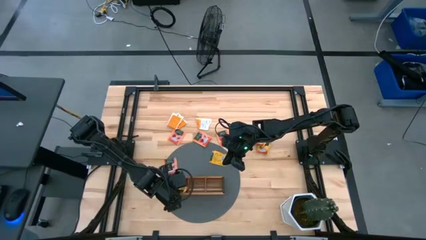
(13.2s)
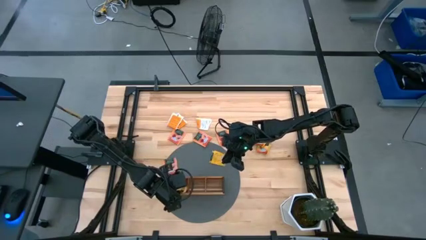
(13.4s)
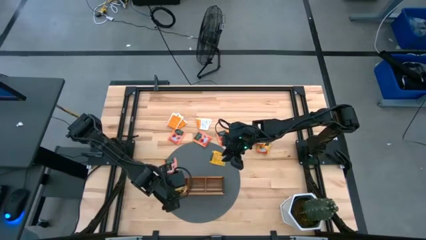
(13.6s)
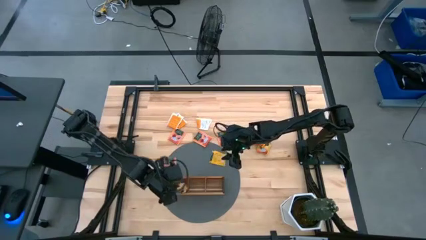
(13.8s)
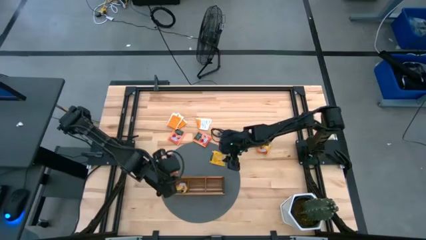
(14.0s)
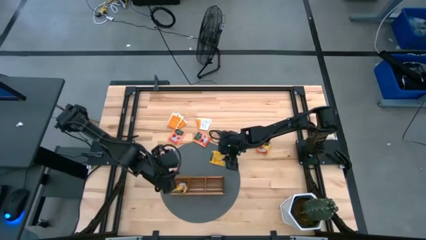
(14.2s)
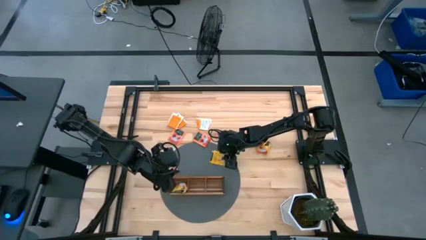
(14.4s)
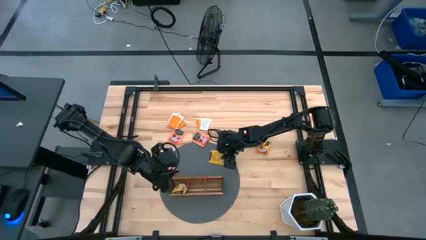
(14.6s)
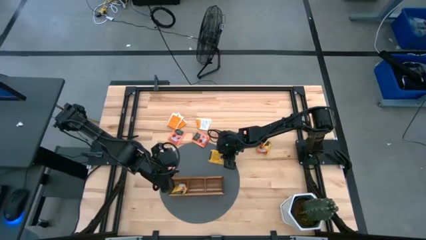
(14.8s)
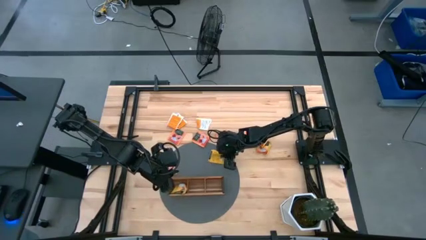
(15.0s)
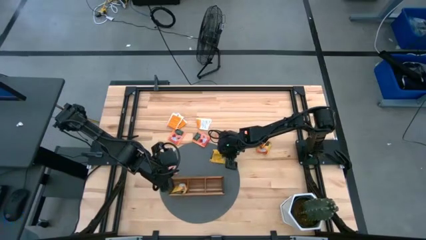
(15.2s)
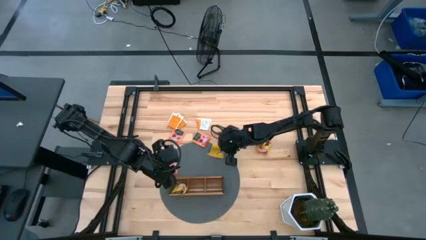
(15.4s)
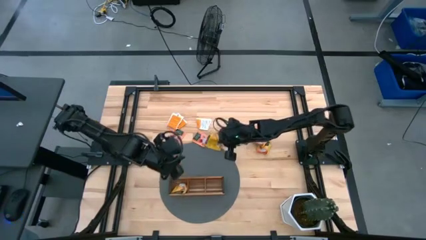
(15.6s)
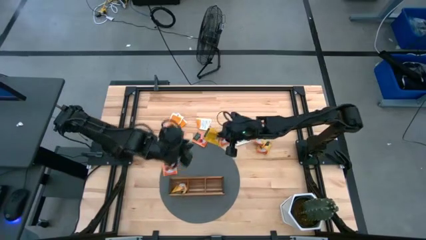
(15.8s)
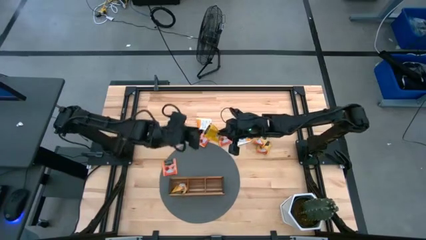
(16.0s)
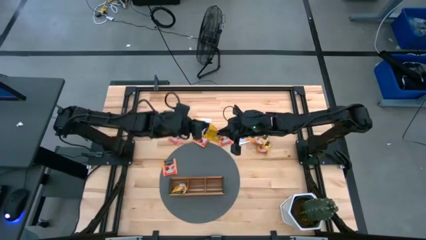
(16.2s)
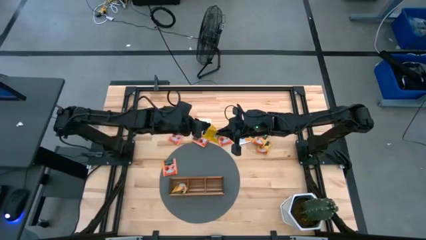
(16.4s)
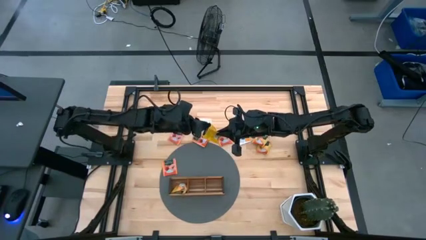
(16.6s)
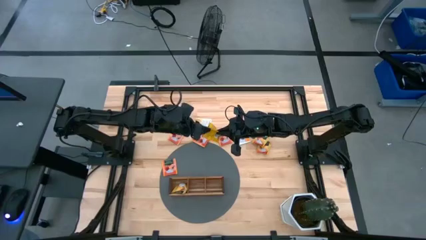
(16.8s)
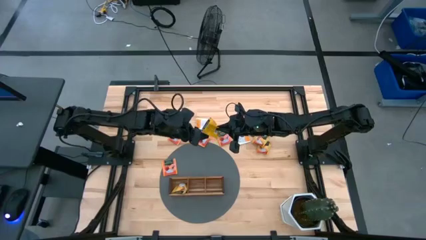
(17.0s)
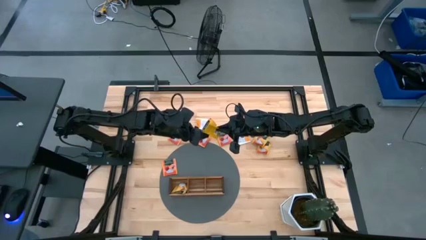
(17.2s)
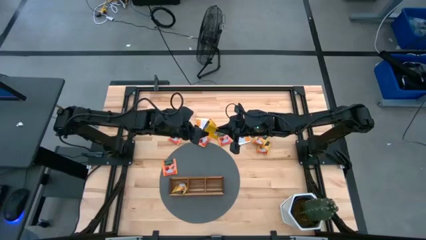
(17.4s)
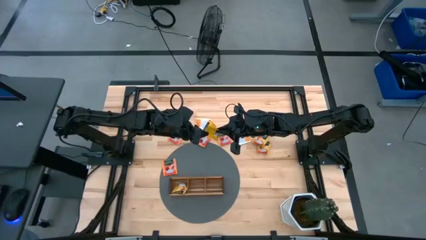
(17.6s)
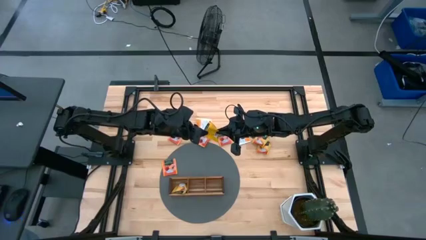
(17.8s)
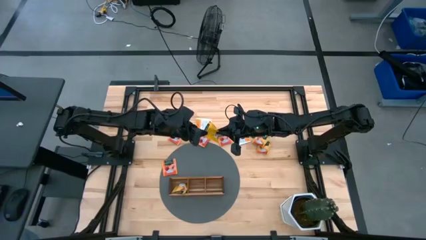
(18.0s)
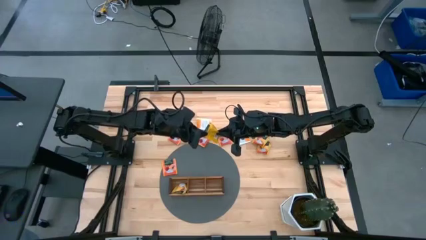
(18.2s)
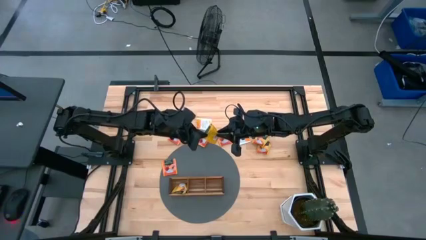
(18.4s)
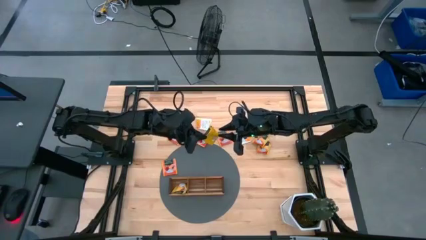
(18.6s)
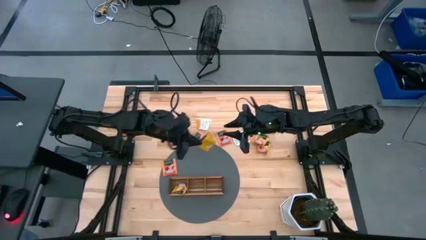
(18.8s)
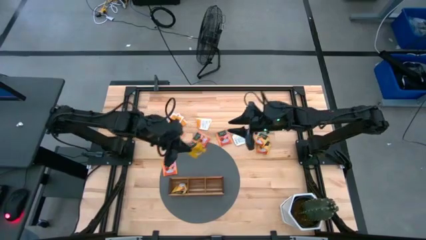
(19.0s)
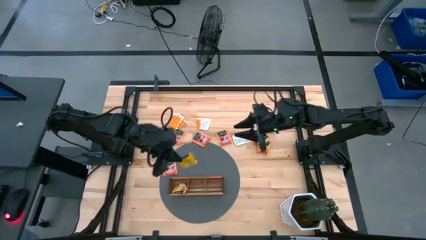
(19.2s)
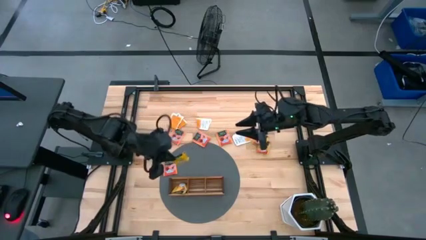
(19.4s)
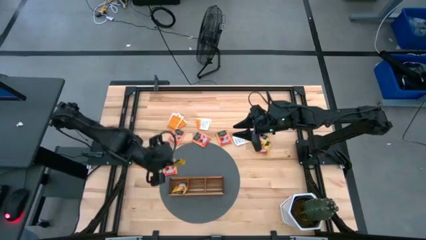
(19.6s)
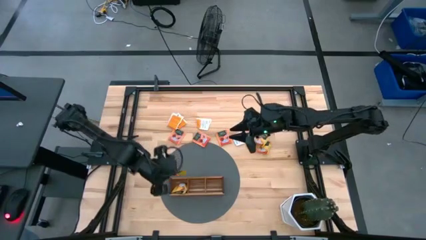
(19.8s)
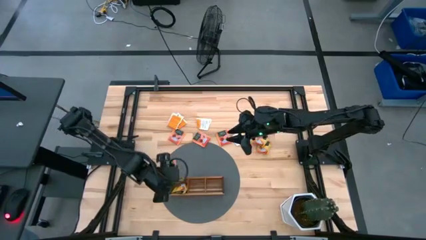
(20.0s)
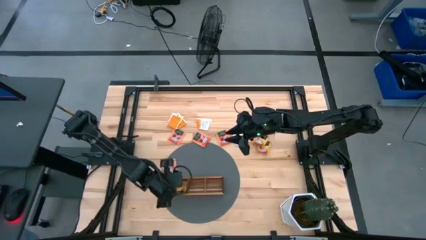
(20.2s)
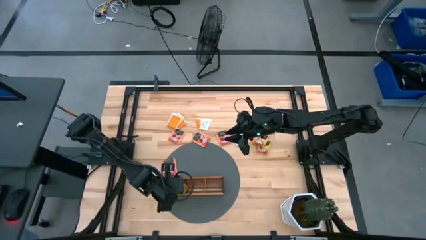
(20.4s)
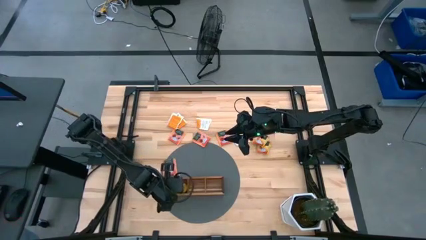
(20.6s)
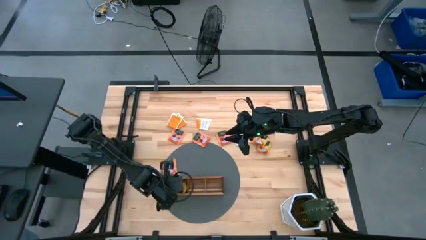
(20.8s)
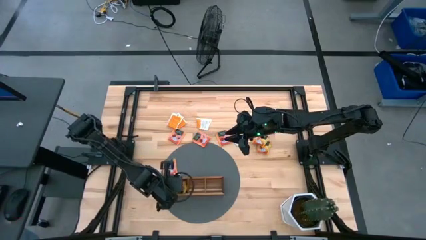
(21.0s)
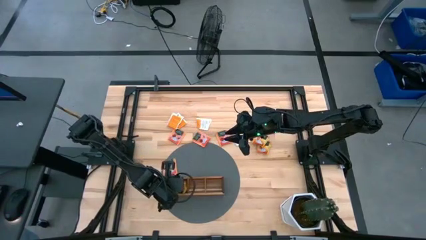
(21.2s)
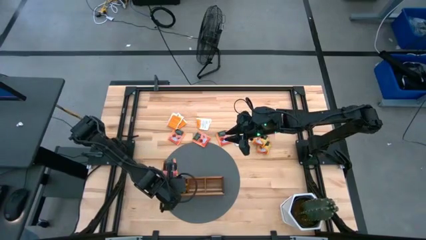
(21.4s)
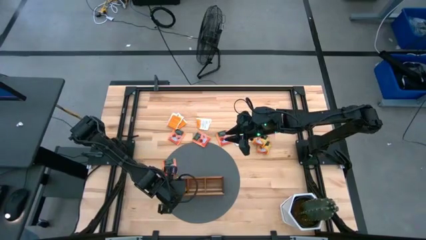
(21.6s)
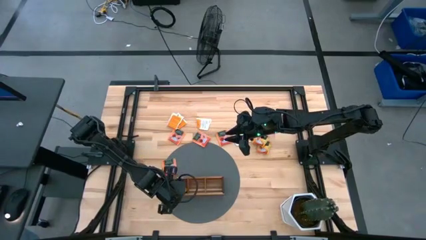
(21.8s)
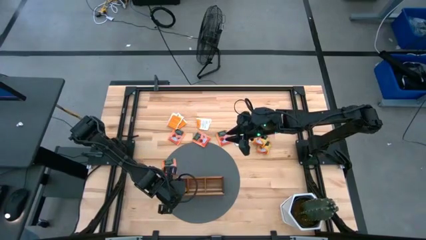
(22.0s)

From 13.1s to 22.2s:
Task: Pick & Place Tea
Put the yellow tea bag into the left section of the wooden organizer

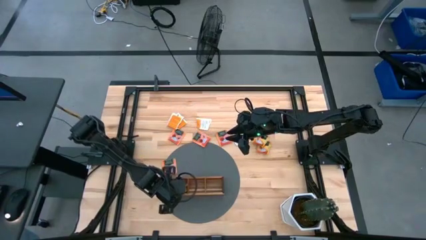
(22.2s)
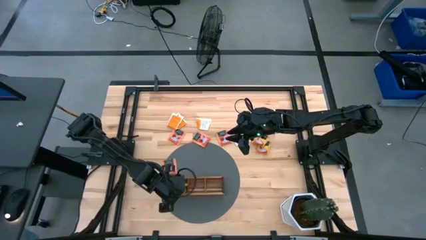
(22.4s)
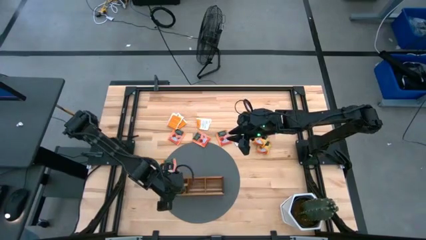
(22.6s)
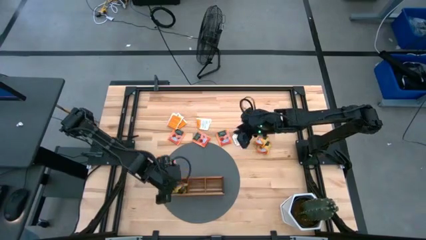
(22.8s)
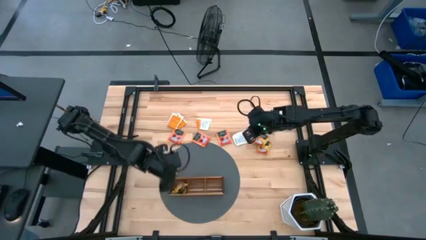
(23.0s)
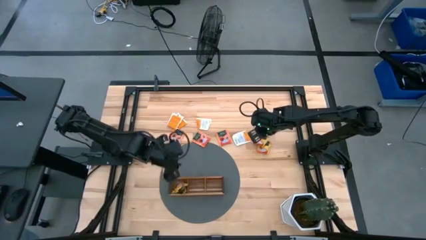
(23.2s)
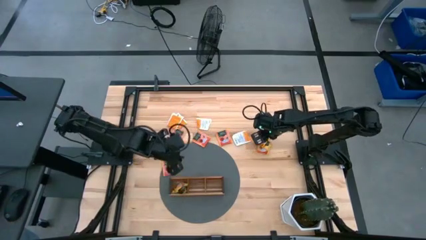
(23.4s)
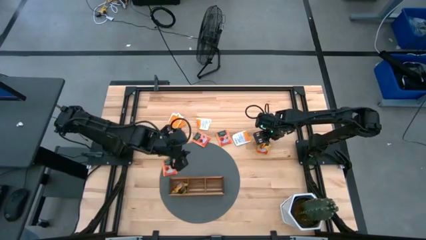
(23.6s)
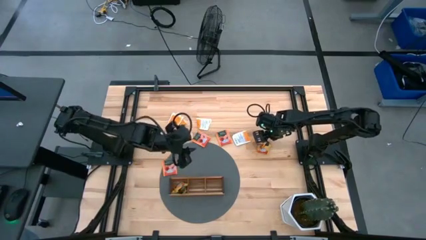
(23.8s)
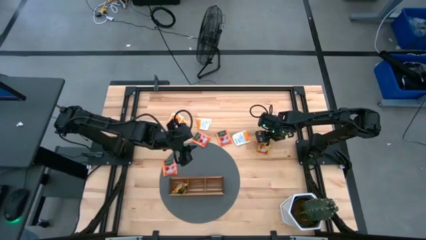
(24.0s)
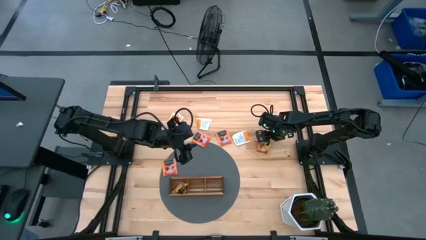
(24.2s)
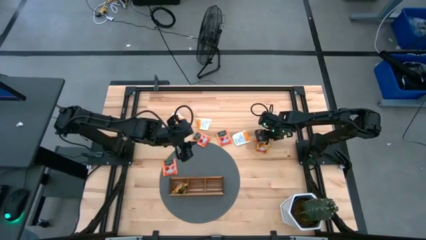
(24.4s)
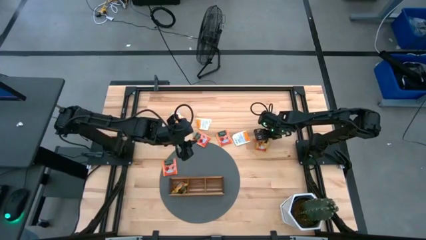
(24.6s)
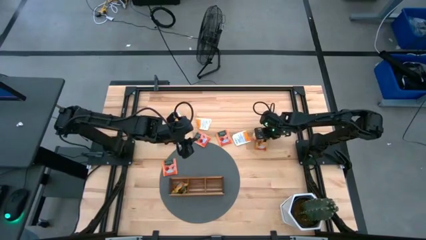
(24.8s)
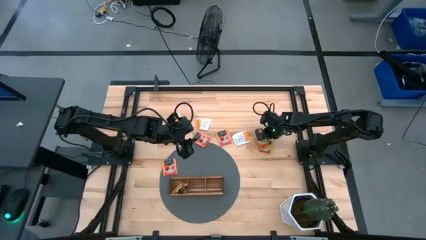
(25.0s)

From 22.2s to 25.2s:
Put the yellow tea bag into the left section of the wooden organizer
